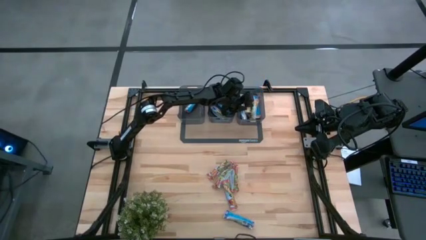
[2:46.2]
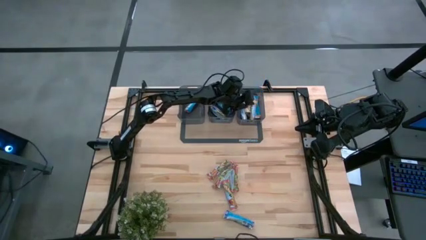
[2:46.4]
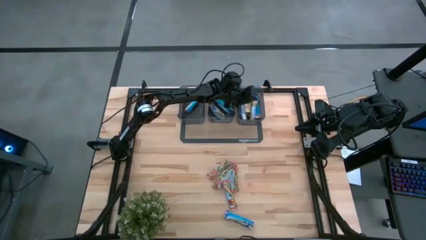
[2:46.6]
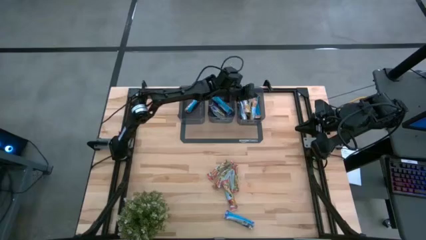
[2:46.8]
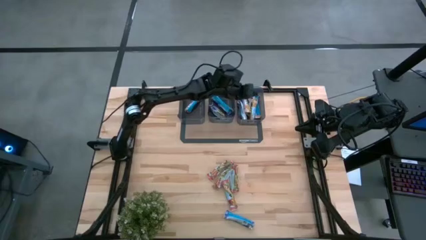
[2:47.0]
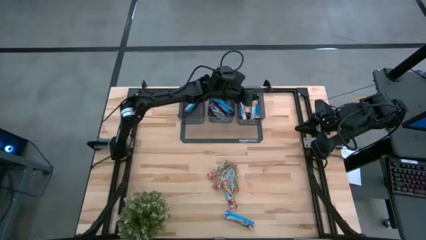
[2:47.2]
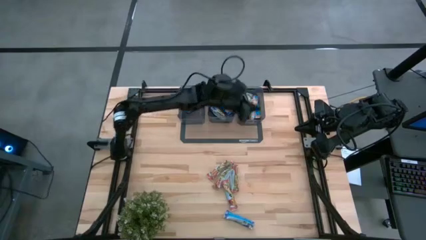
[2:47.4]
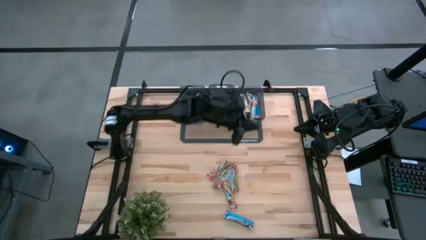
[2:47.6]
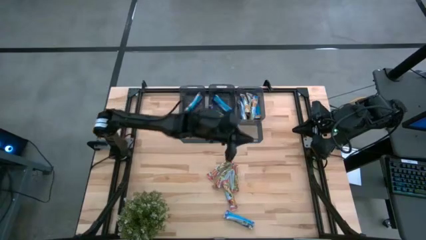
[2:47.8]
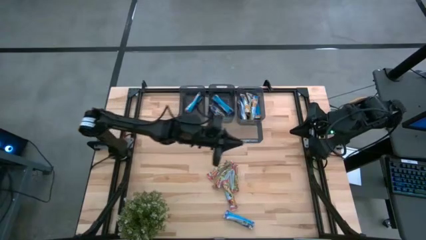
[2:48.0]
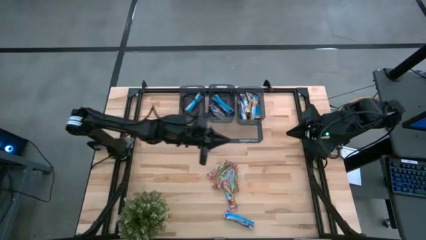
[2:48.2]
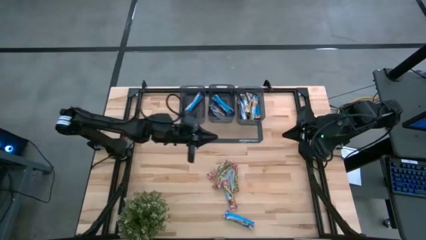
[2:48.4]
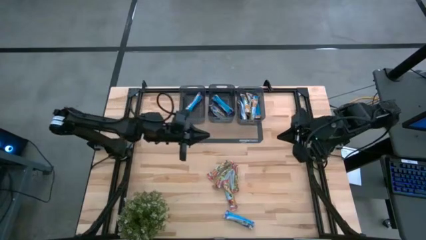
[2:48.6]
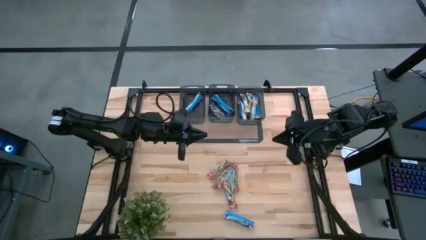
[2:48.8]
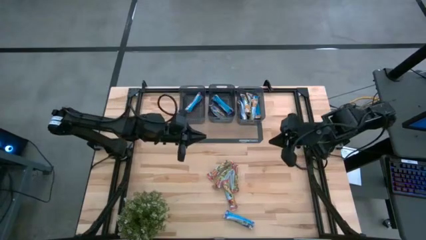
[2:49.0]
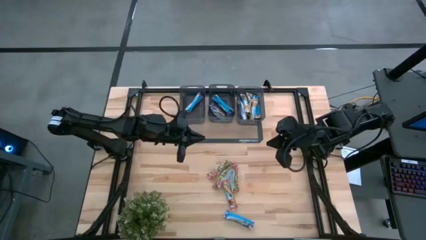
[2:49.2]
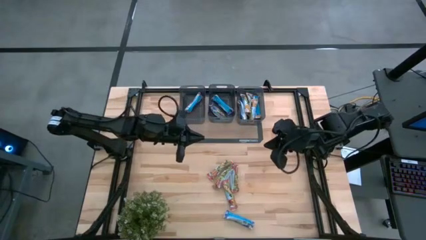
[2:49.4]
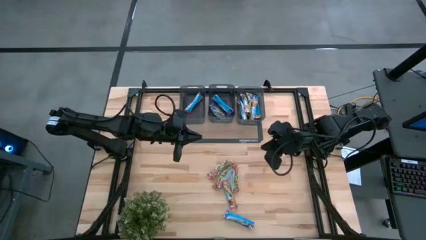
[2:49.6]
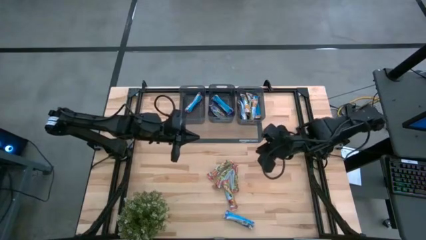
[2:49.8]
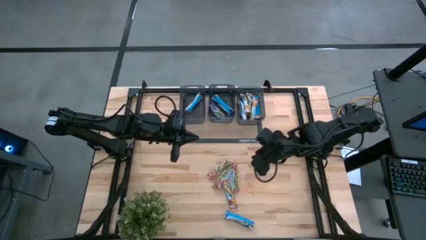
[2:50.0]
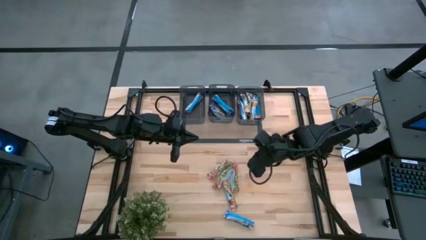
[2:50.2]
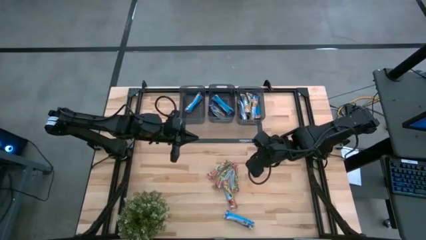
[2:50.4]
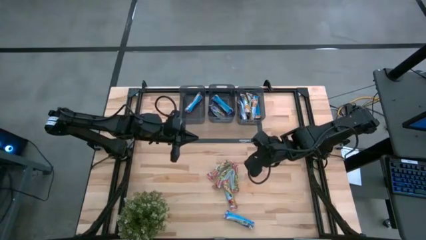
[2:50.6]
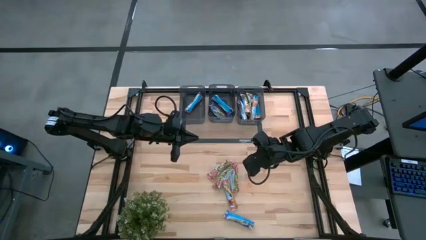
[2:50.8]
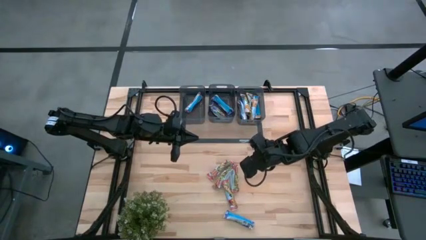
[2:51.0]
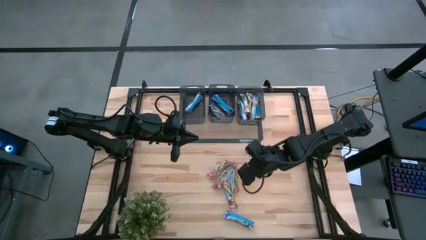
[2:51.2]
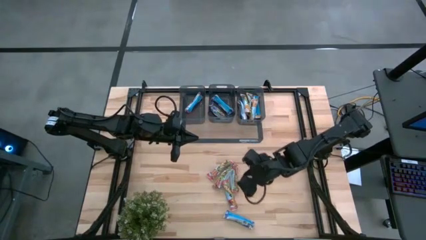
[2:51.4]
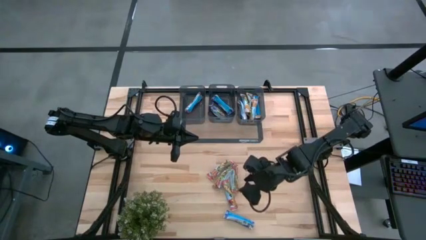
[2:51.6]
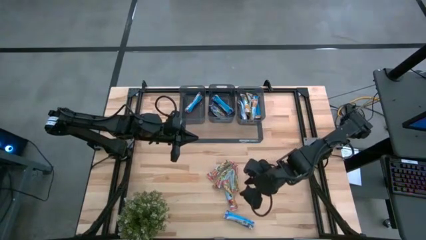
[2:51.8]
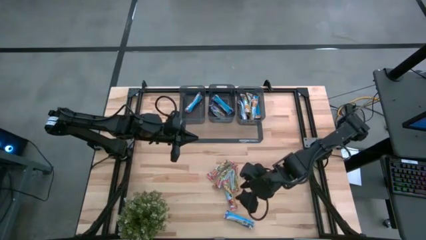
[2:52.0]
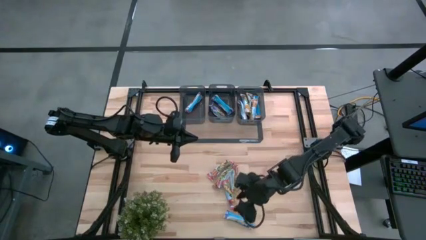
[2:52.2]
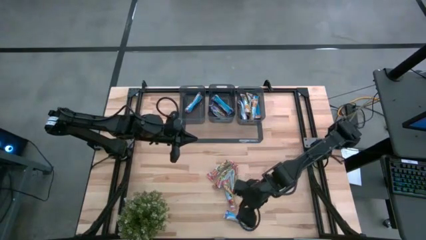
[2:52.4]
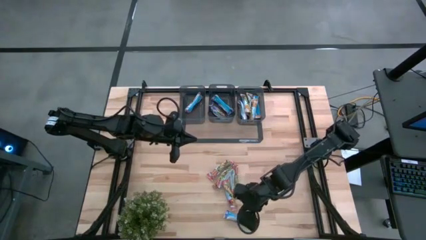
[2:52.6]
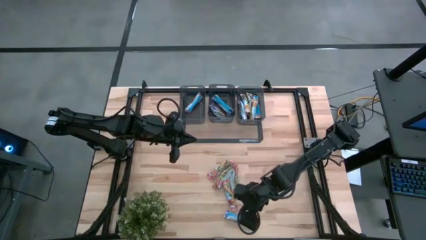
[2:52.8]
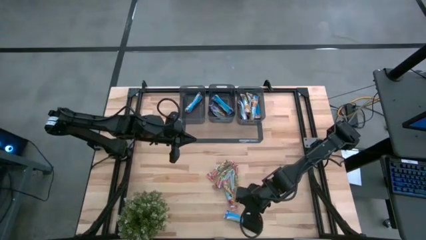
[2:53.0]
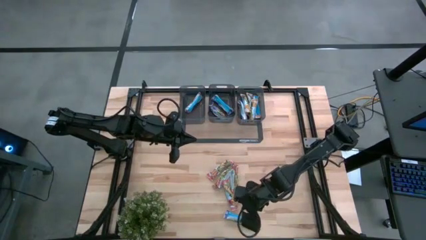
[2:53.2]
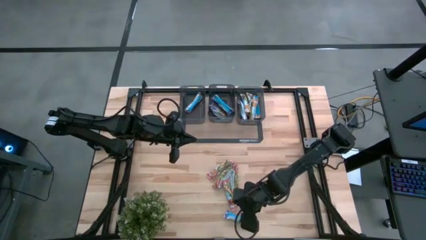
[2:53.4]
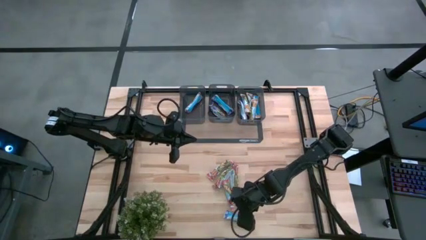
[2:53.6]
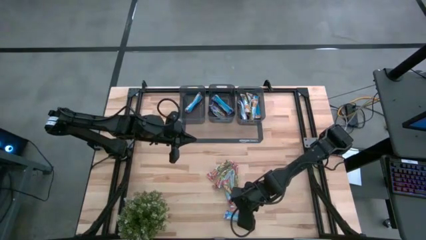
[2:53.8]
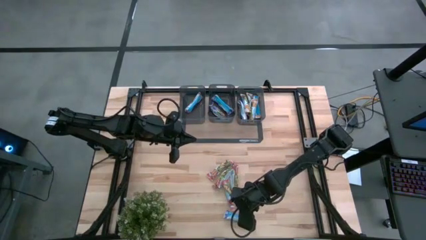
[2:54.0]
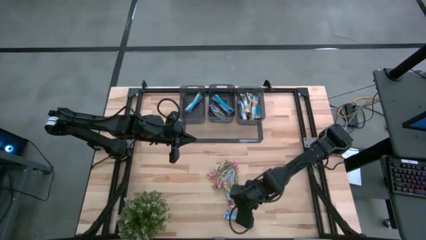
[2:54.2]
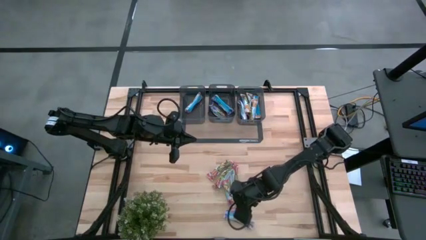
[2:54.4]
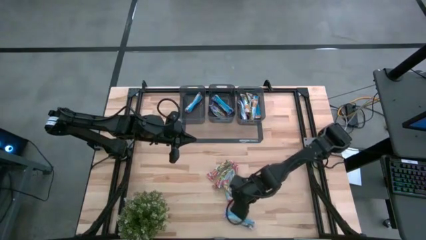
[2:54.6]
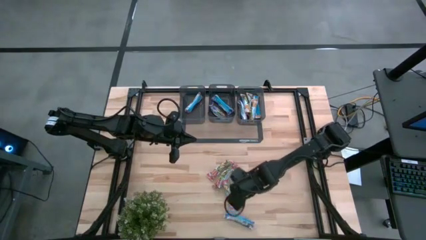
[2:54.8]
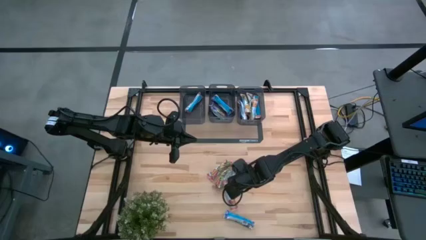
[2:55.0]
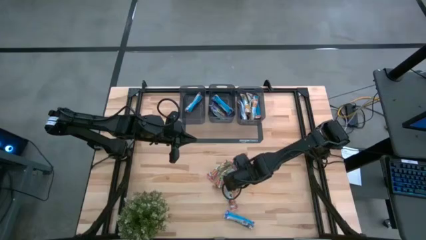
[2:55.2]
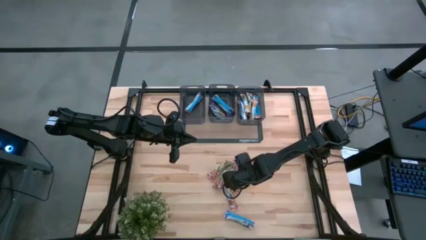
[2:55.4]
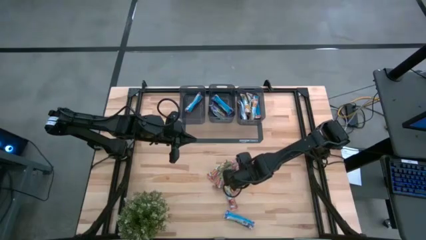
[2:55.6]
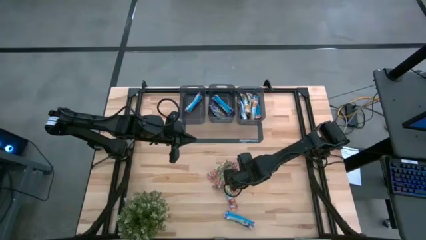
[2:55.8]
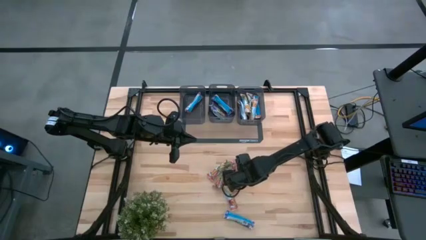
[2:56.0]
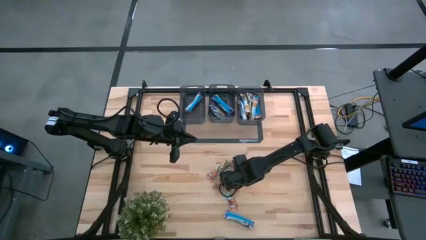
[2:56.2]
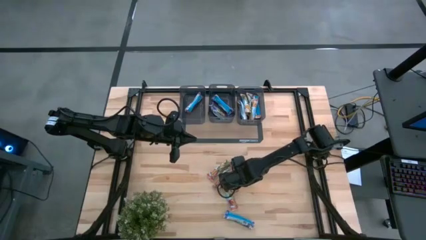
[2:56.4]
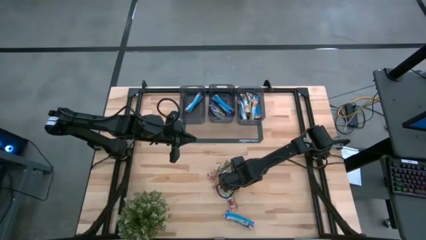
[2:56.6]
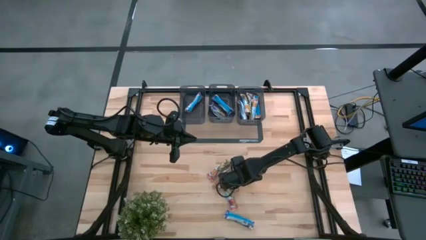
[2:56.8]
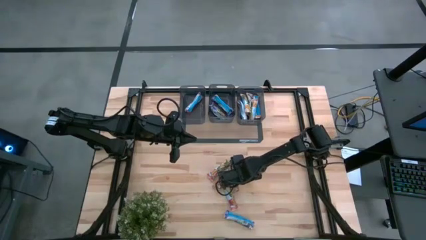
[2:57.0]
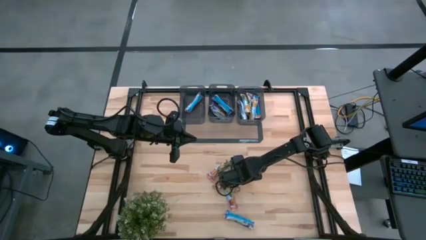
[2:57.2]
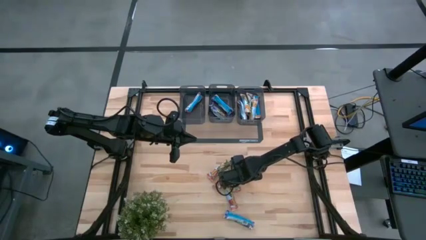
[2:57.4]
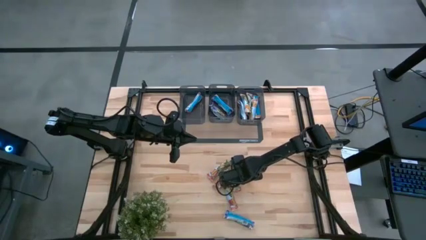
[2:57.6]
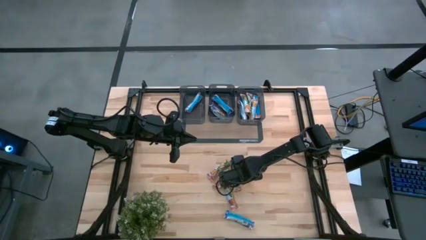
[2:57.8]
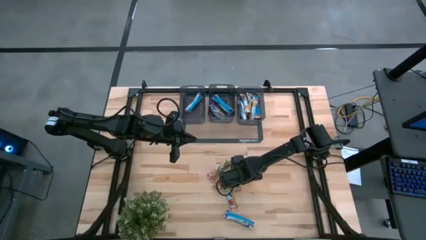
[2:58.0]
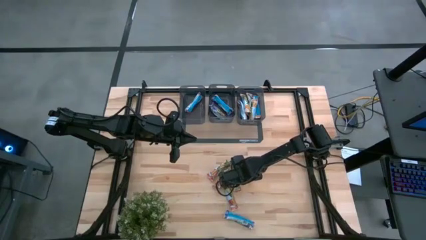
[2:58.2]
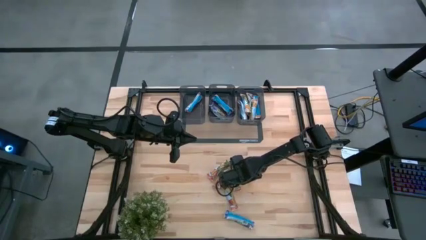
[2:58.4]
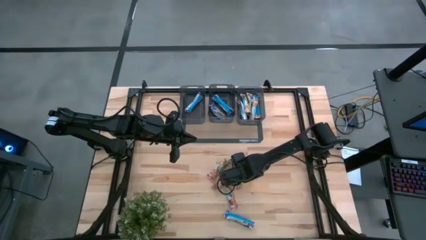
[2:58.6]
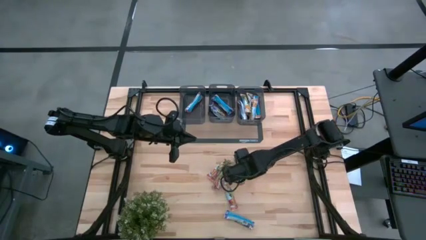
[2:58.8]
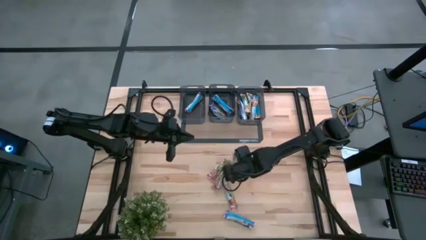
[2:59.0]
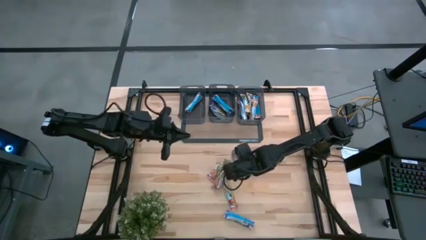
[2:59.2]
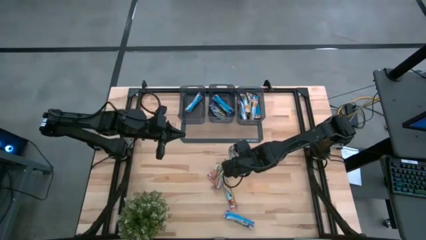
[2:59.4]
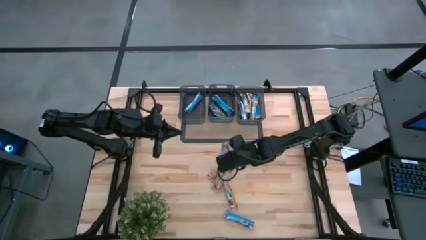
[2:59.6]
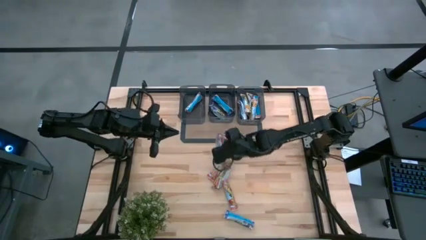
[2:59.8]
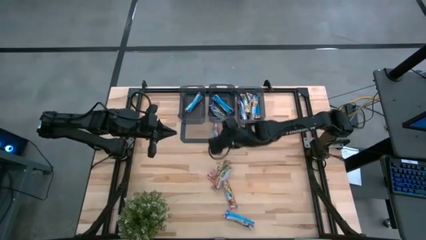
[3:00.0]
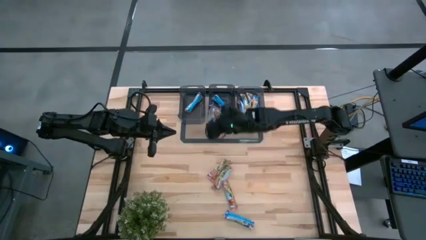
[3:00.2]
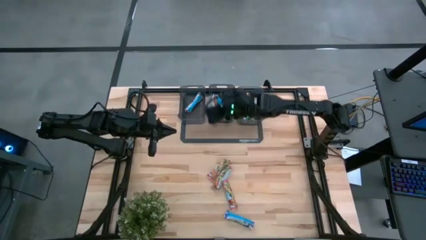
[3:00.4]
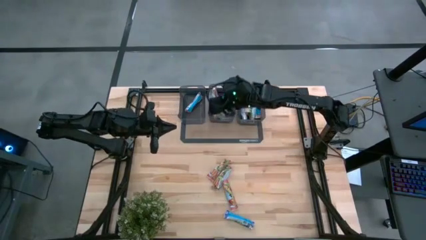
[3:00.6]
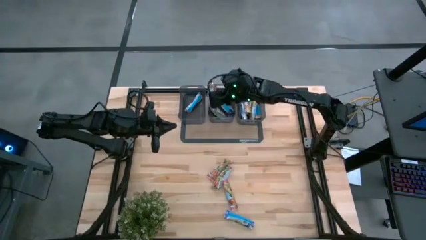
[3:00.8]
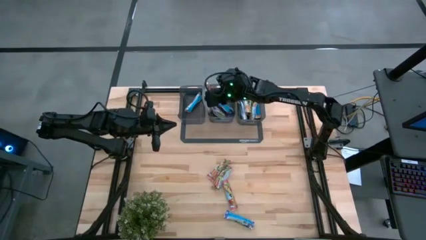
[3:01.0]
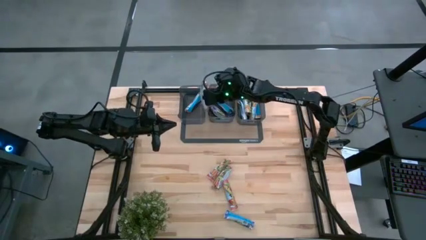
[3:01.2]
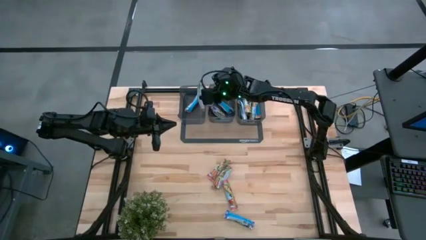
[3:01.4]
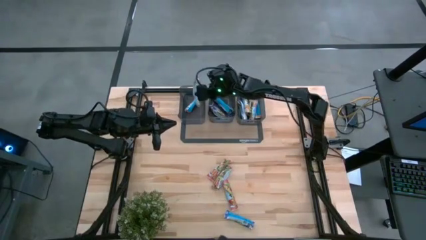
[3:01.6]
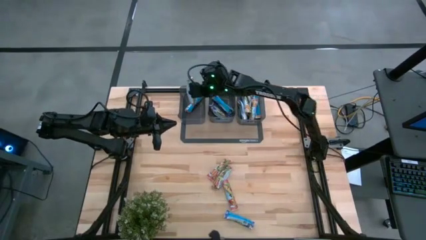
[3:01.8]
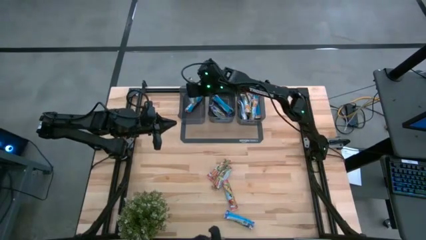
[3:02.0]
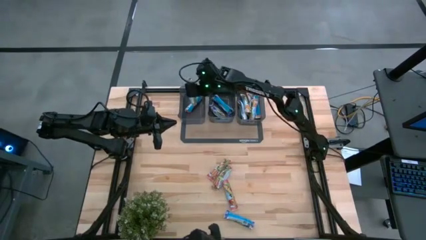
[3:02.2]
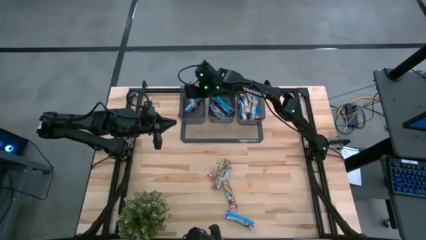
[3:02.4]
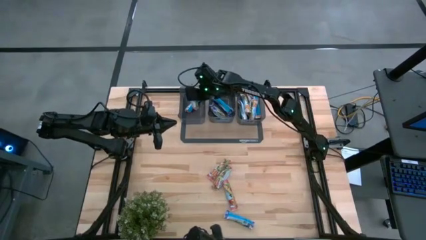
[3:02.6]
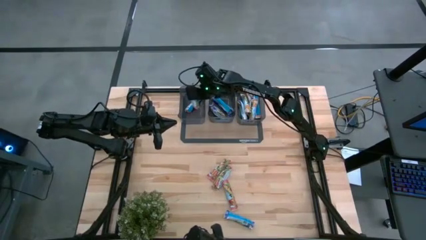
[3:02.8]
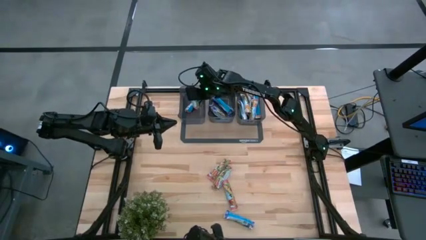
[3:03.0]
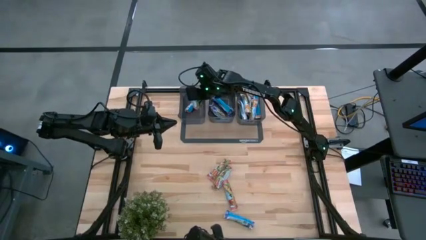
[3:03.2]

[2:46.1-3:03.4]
Task: Pick and place Granola Bars by type
Put the red granola bar into the left black bin
